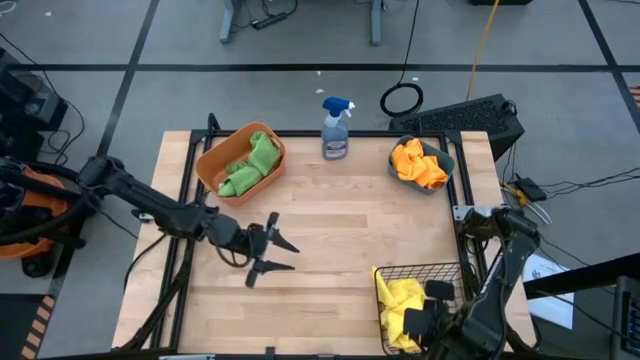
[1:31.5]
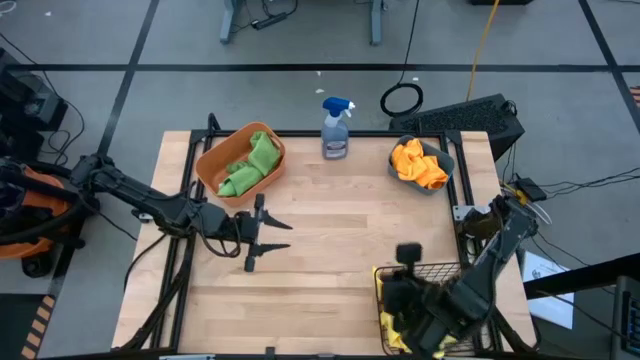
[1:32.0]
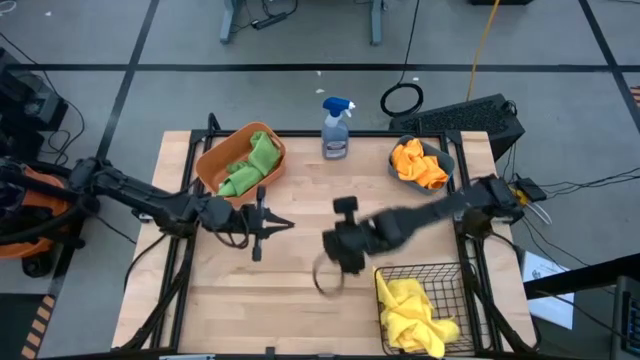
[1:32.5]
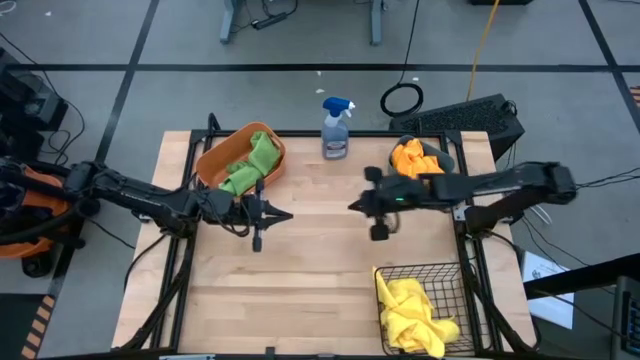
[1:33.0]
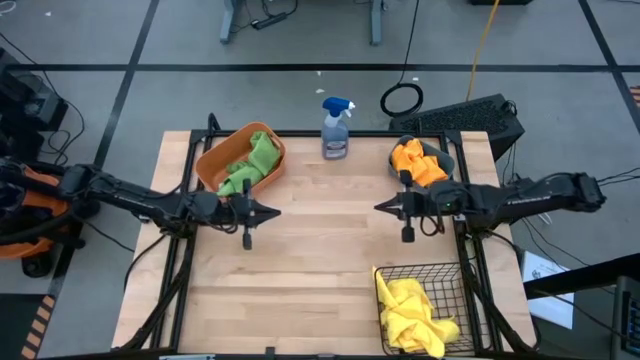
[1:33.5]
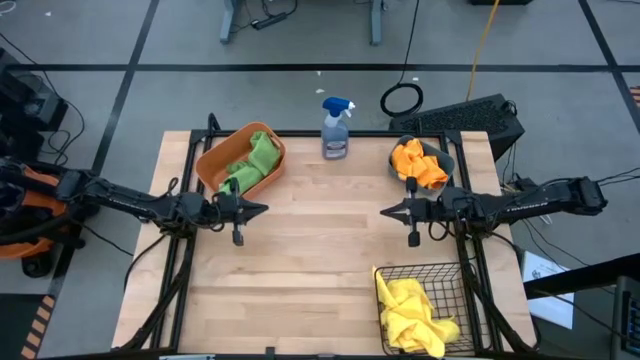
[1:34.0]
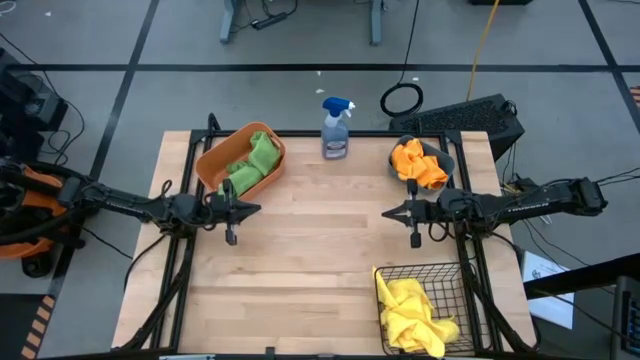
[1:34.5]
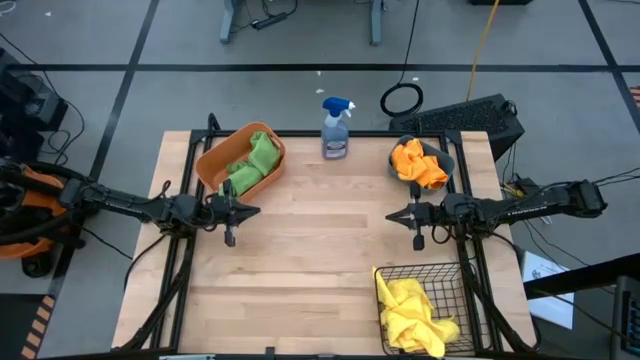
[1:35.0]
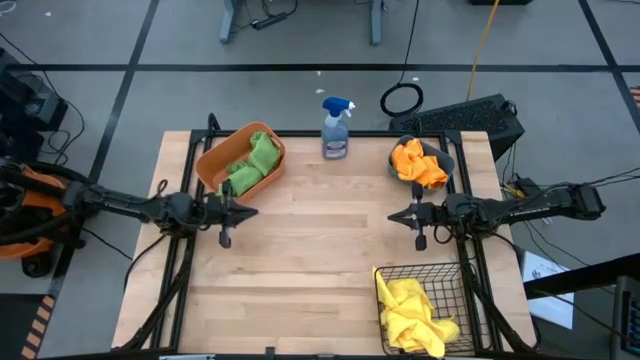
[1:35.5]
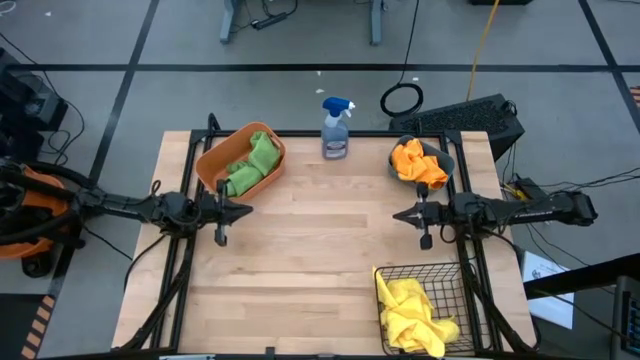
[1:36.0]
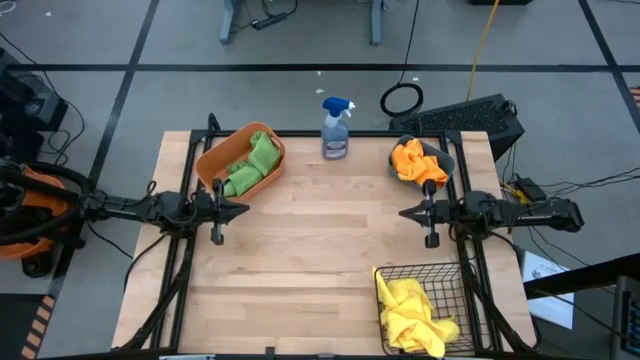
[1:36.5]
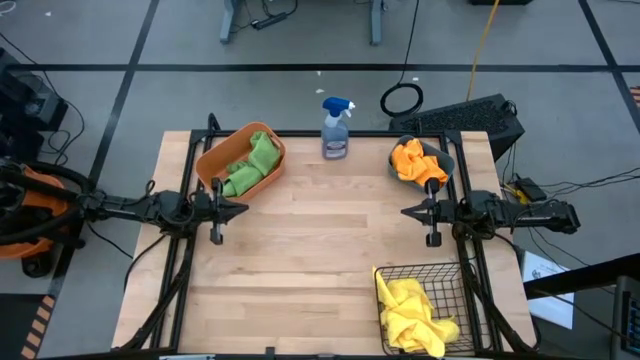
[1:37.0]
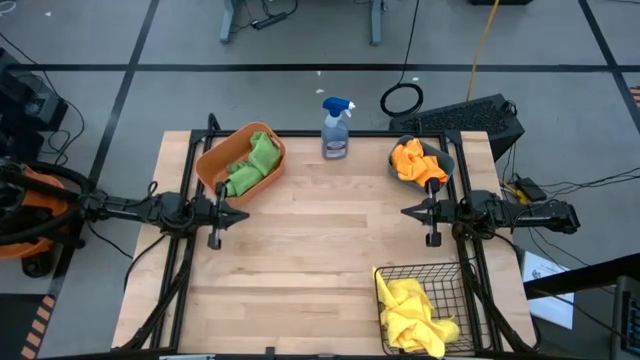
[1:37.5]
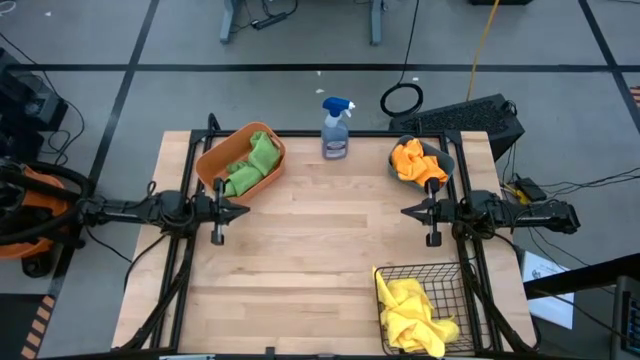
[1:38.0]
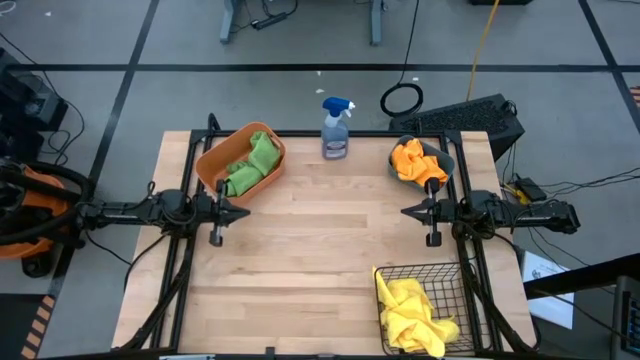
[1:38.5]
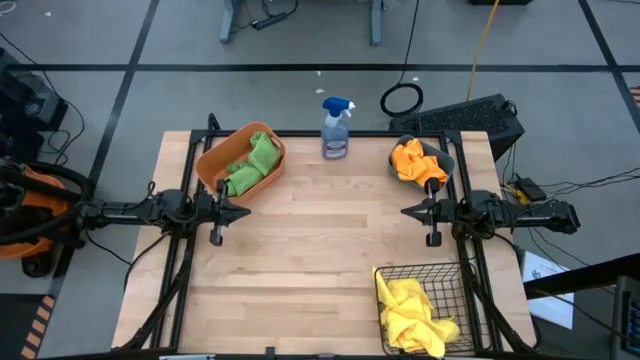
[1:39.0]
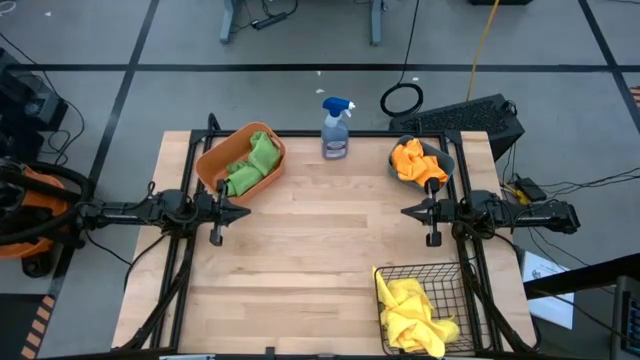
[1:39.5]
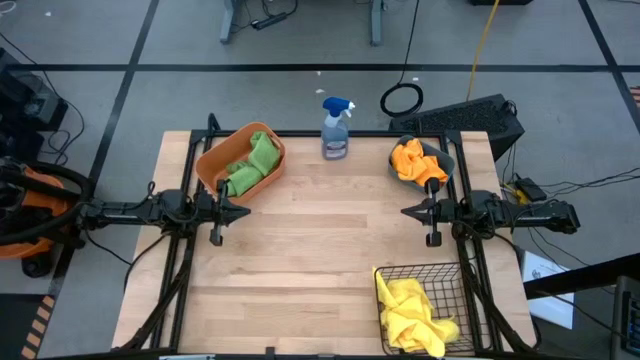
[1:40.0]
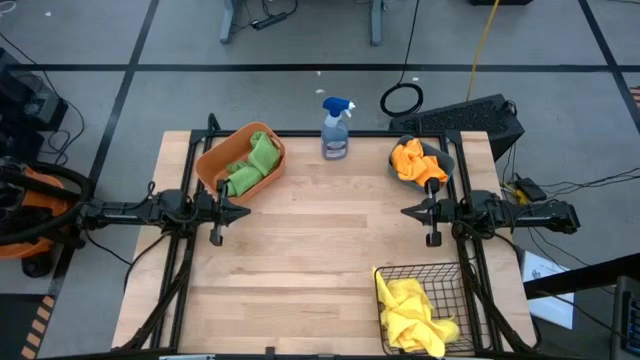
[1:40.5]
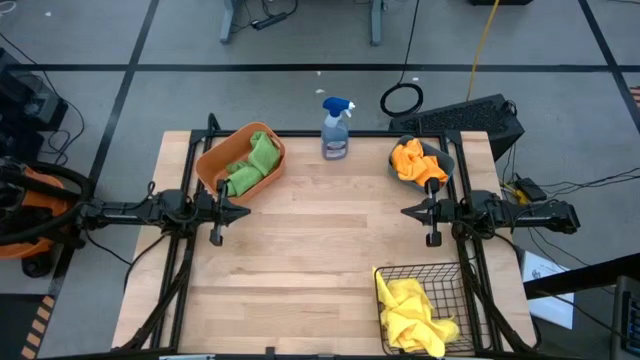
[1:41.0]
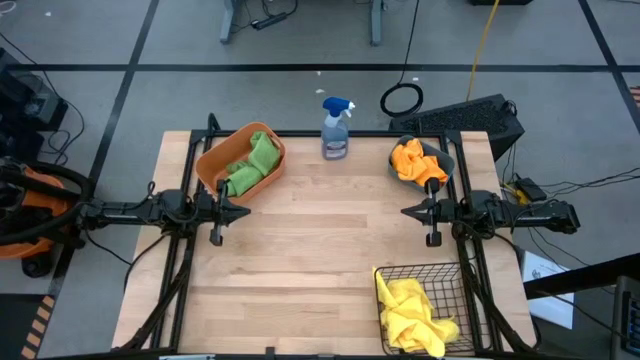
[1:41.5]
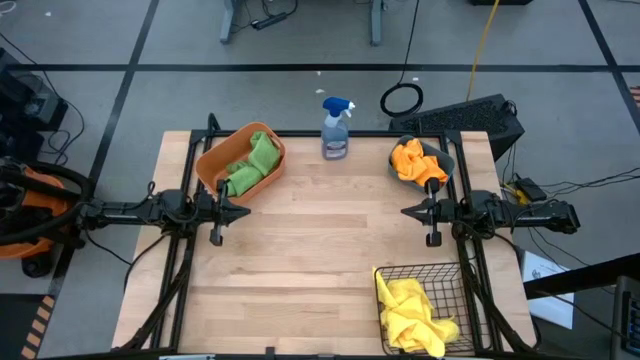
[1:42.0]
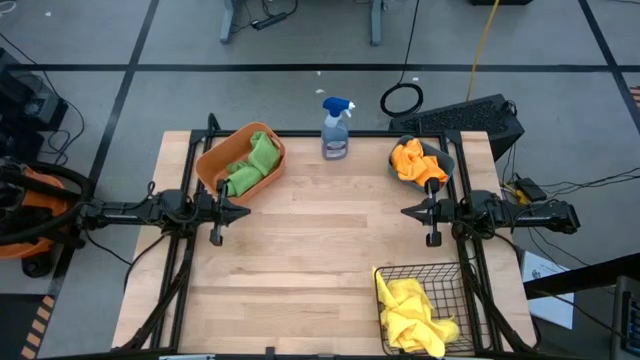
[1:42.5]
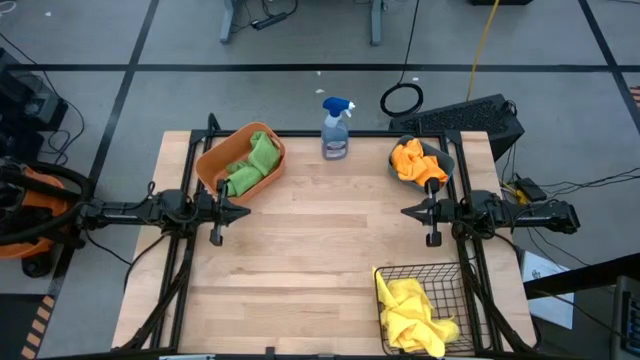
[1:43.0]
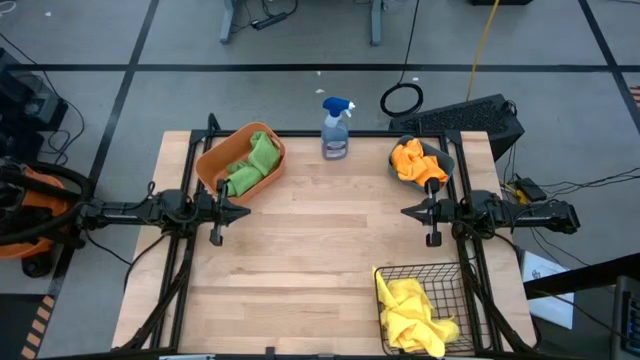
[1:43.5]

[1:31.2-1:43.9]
Task: Sort microfiber towel by color & place in baskets
Return to Home Position

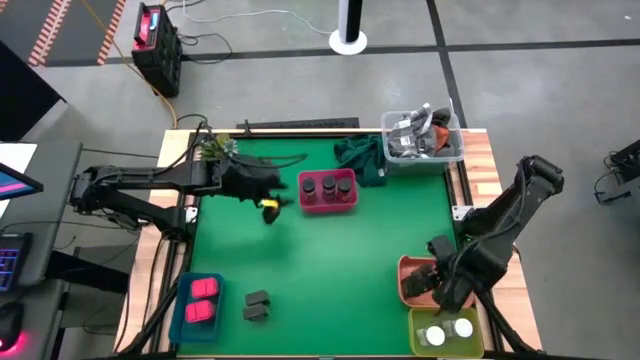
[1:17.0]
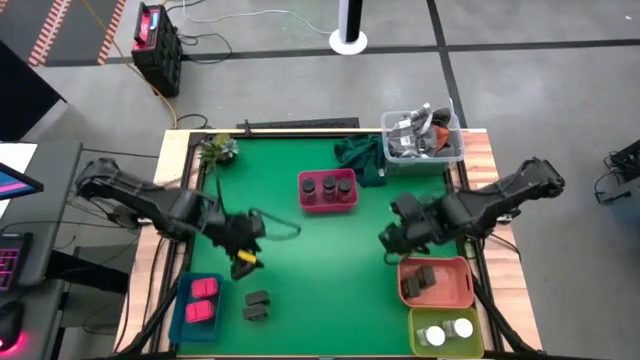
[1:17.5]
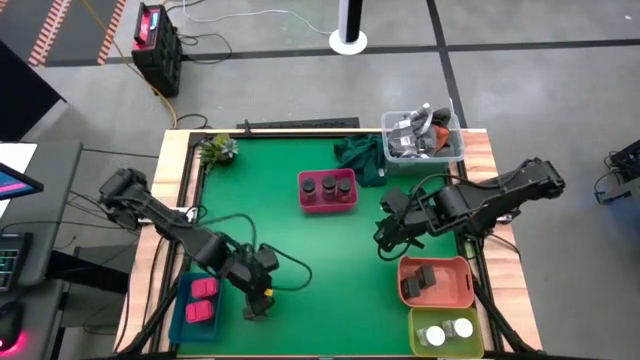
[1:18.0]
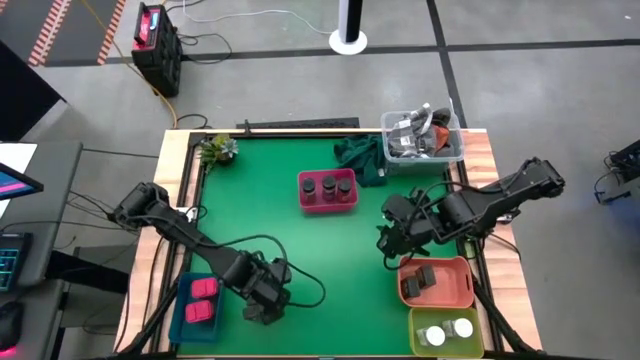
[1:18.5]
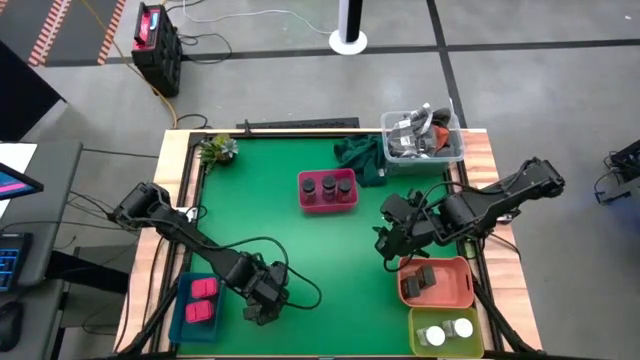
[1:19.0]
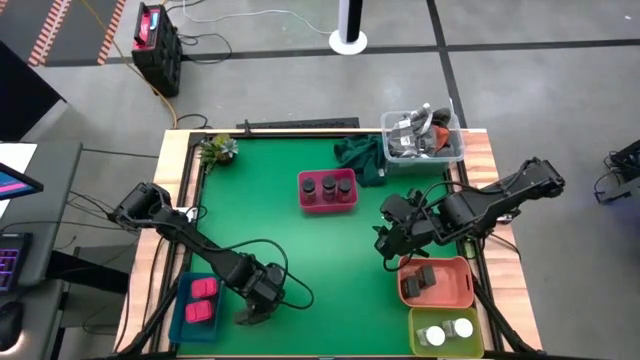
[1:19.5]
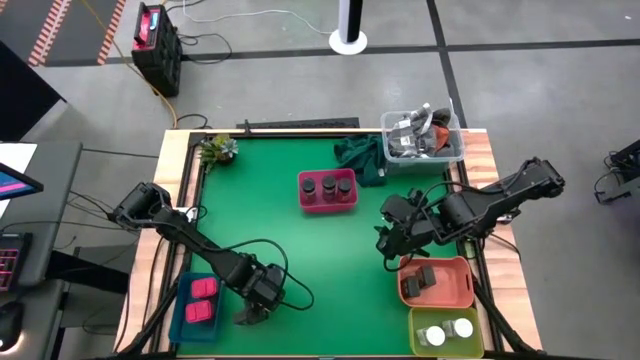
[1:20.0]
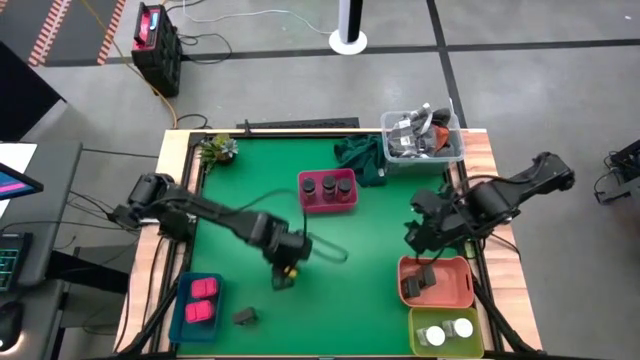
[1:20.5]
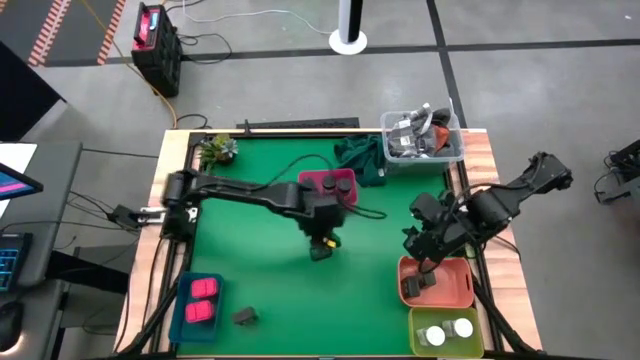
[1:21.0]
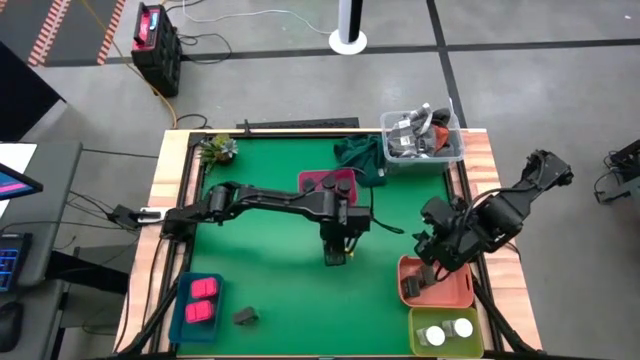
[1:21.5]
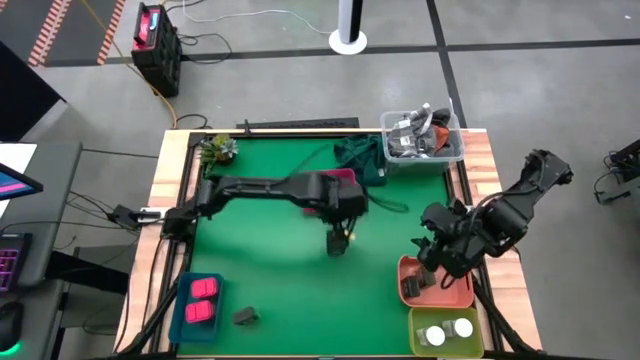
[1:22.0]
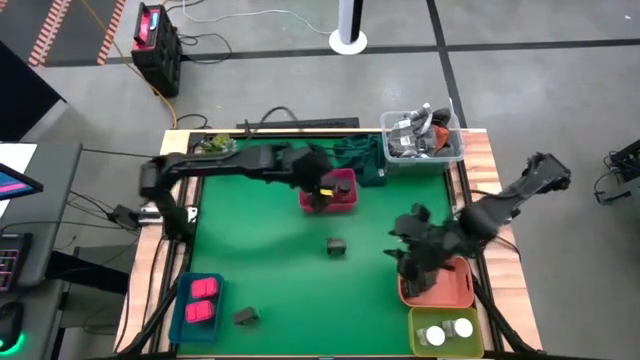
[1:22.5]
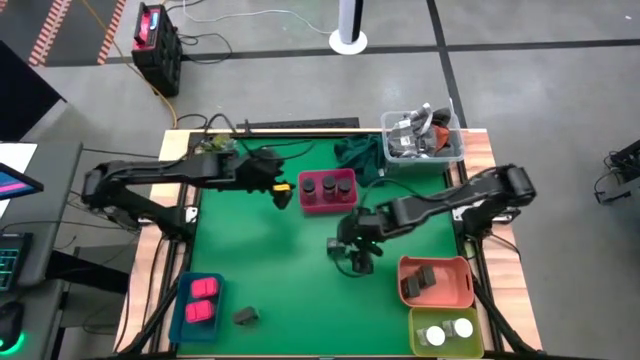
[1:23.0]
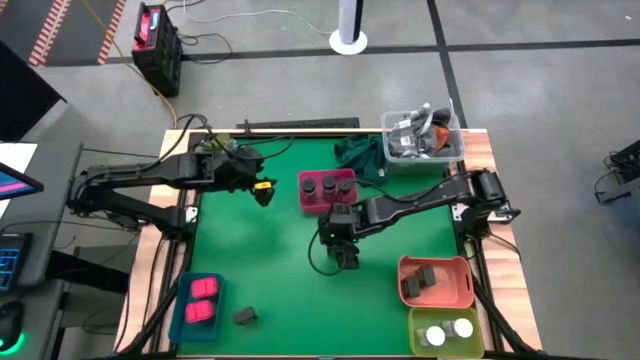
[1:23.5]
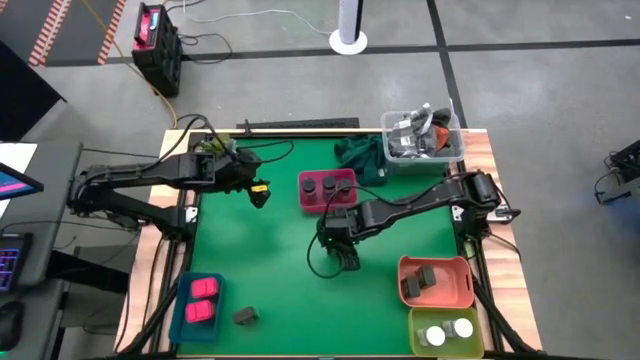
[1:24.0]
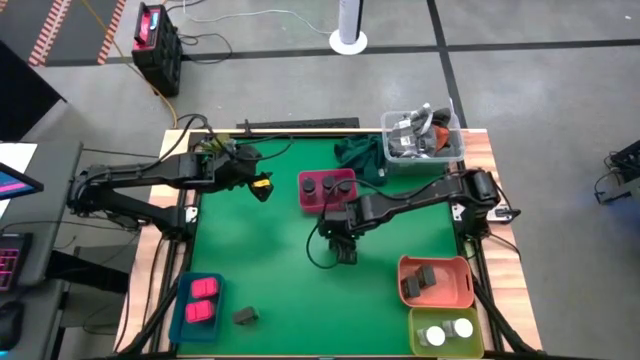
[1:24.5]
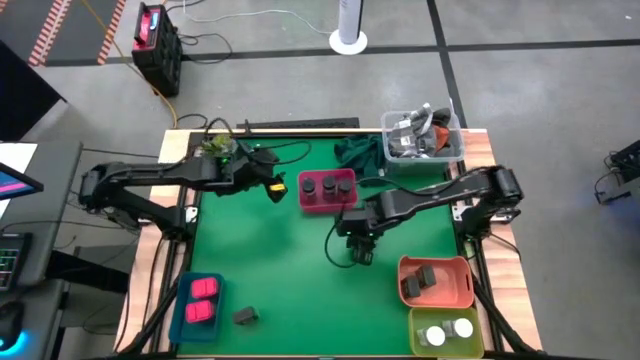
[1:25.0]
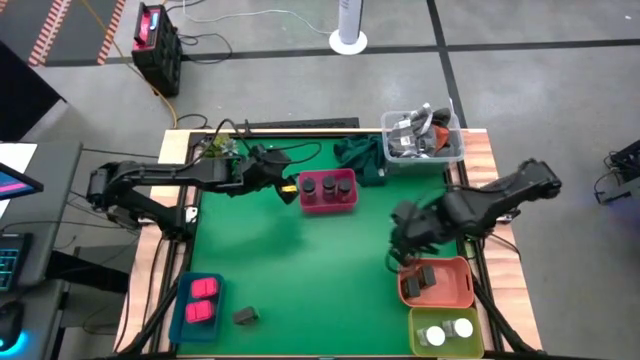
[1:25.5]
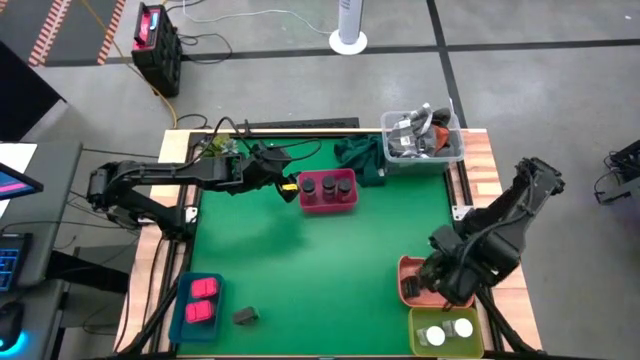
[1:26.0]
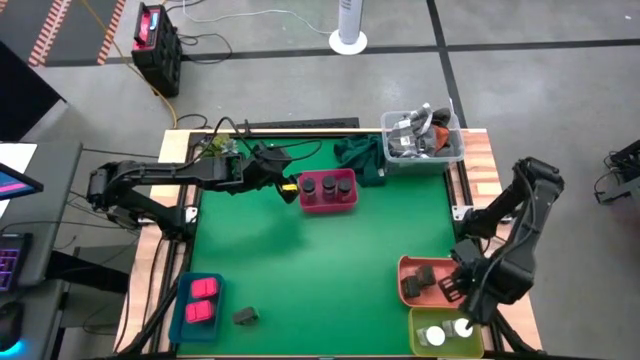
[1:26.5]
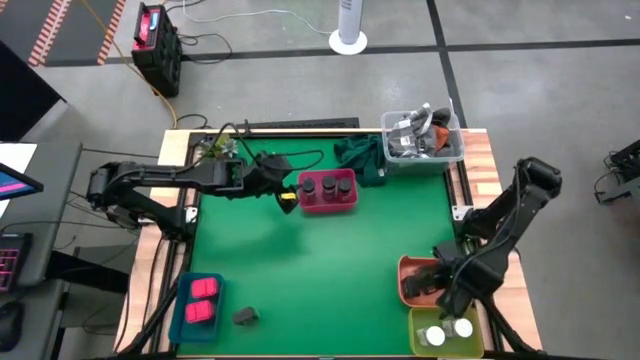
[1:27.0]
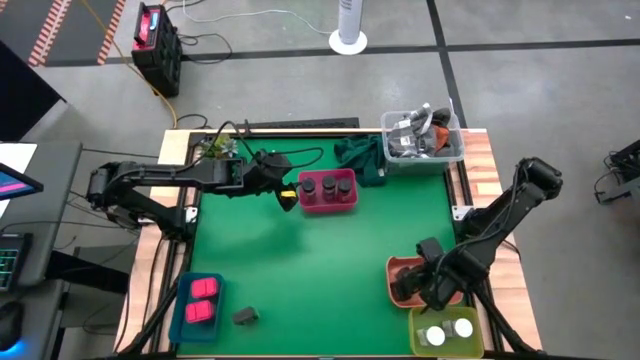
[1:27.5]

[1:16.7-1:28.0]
Task: Sort spices by type
Put the top black seasoning can into the orange bin
